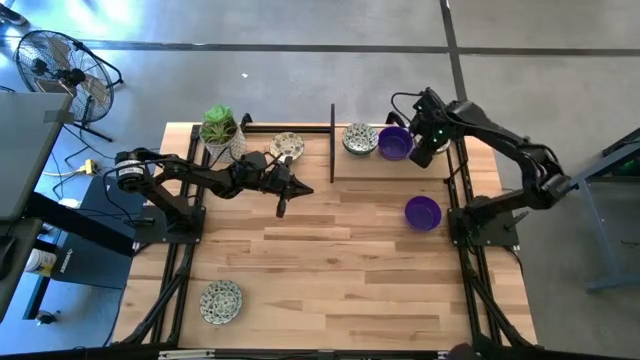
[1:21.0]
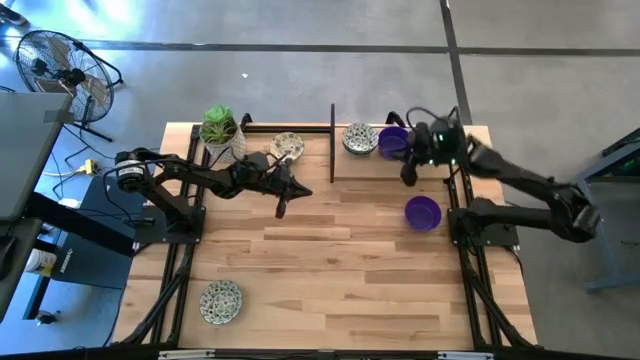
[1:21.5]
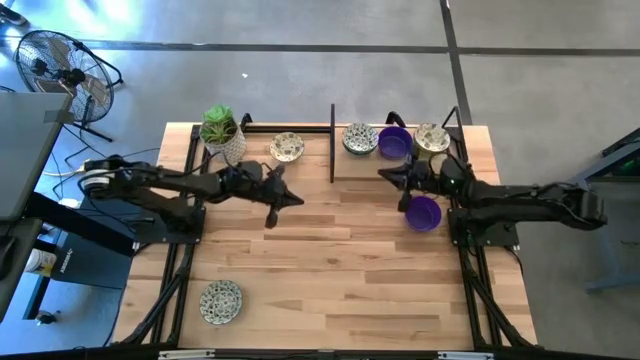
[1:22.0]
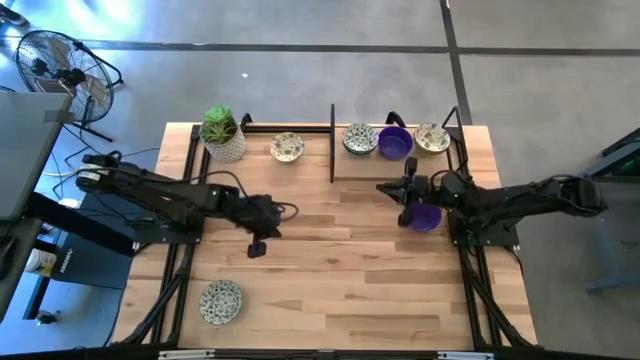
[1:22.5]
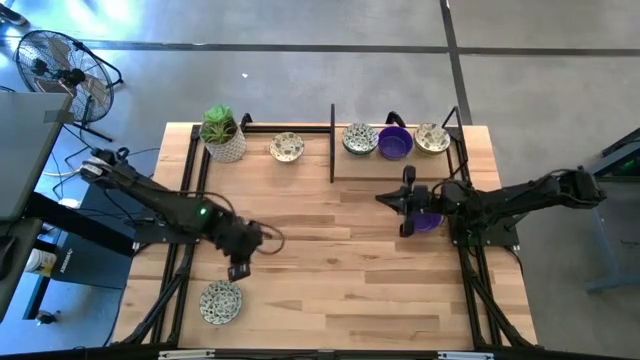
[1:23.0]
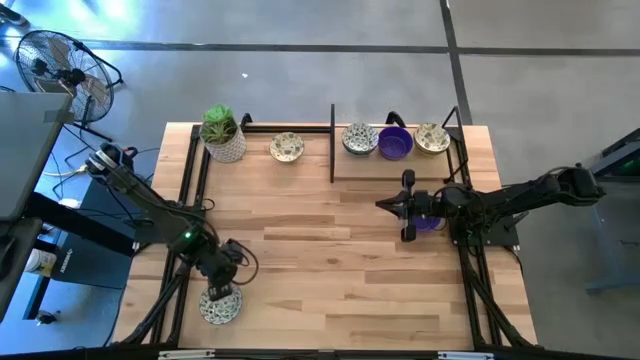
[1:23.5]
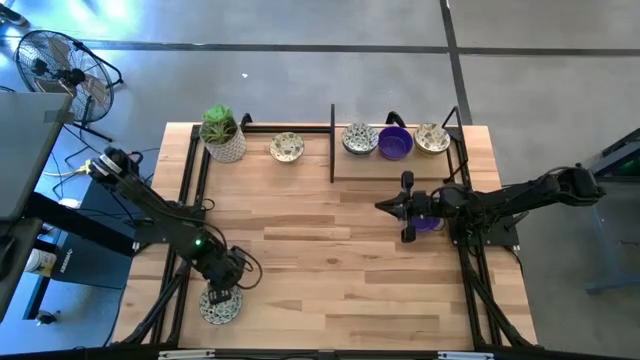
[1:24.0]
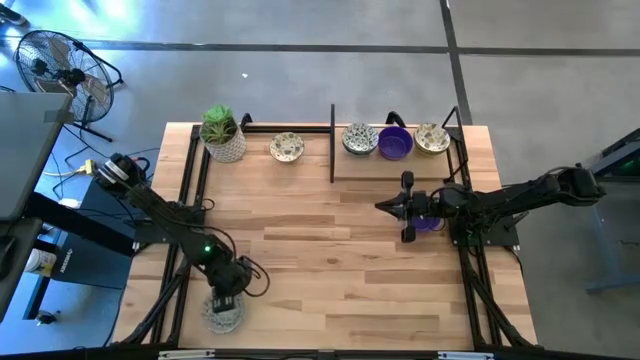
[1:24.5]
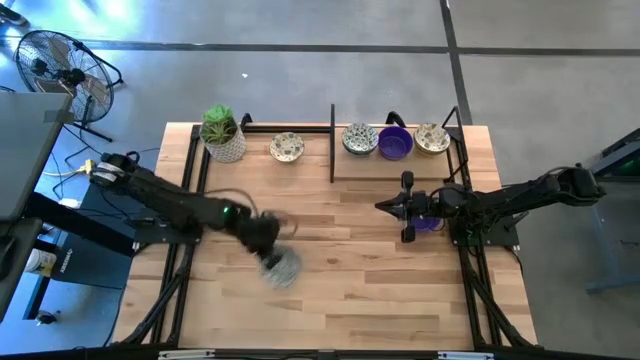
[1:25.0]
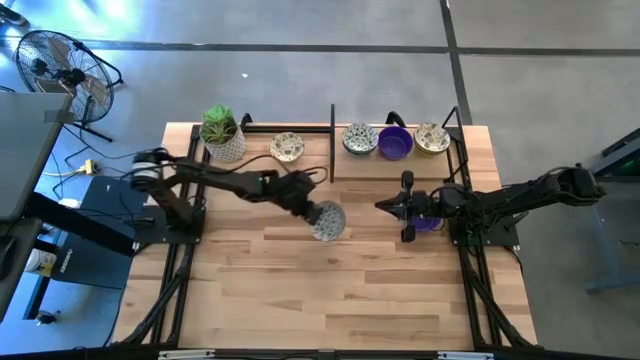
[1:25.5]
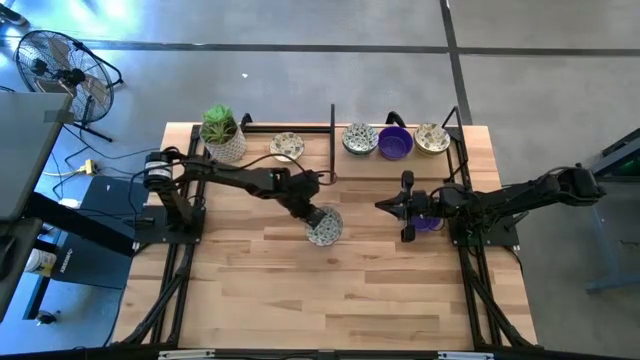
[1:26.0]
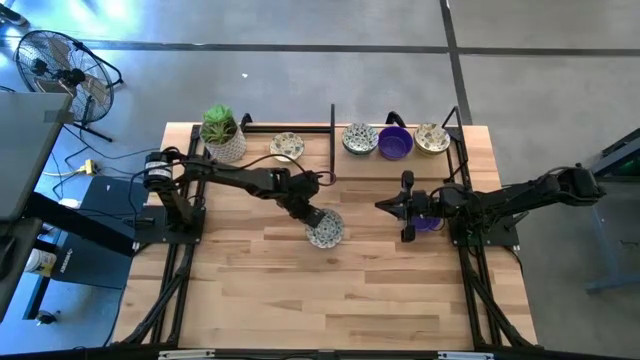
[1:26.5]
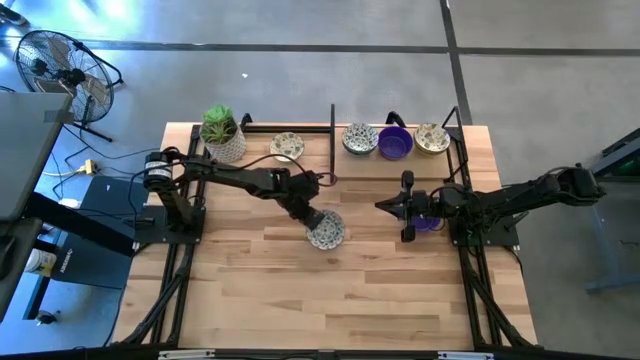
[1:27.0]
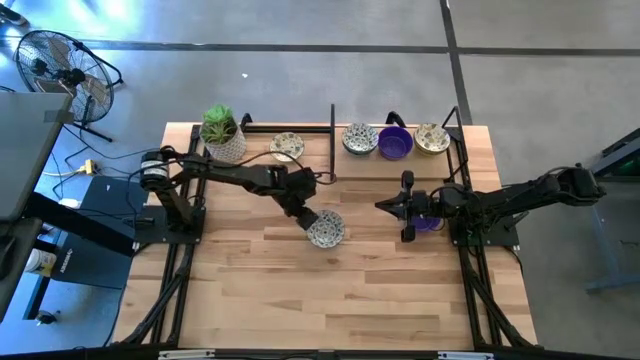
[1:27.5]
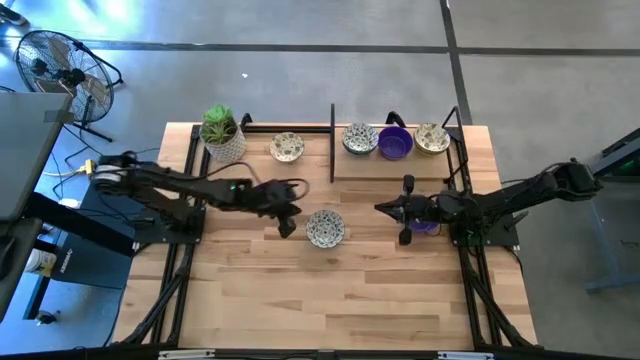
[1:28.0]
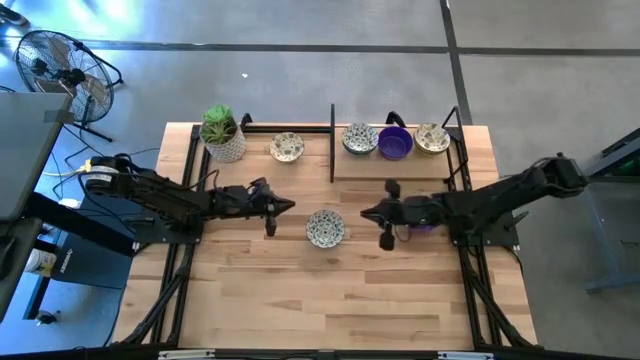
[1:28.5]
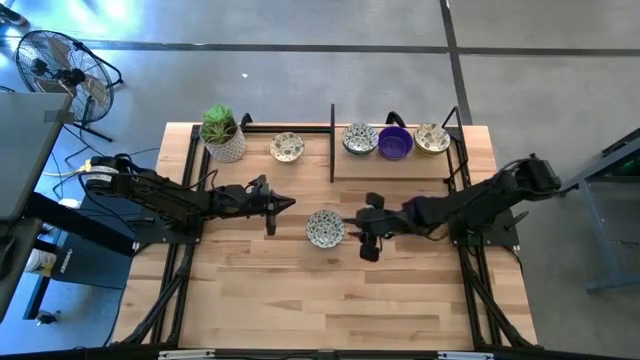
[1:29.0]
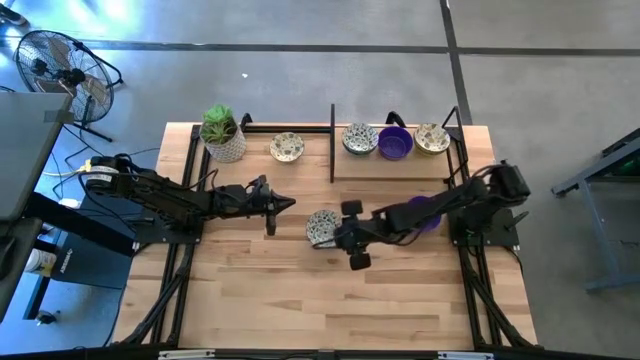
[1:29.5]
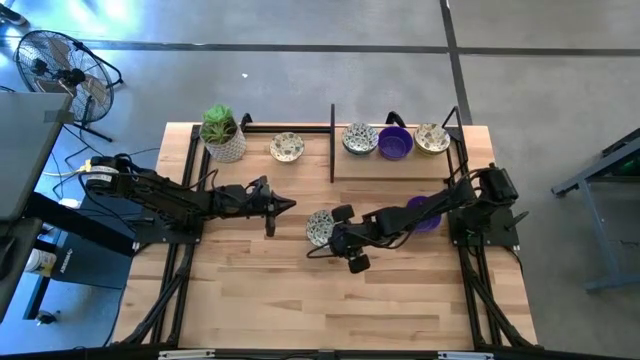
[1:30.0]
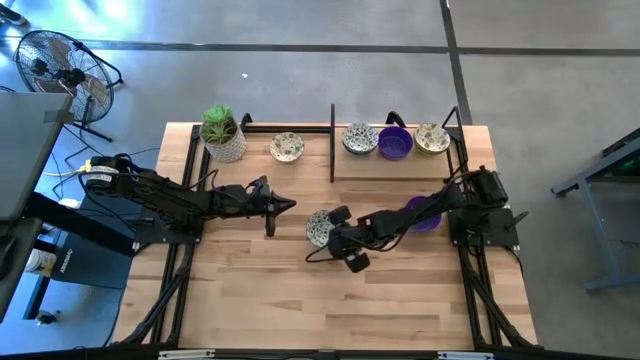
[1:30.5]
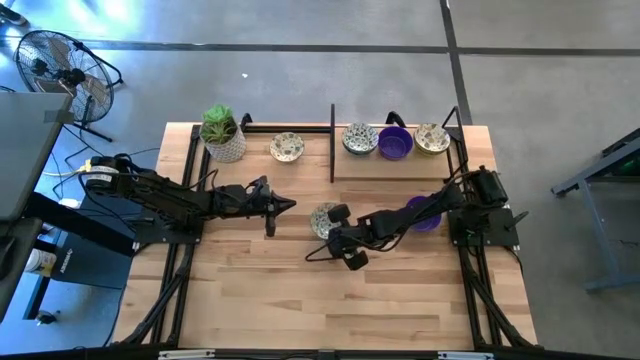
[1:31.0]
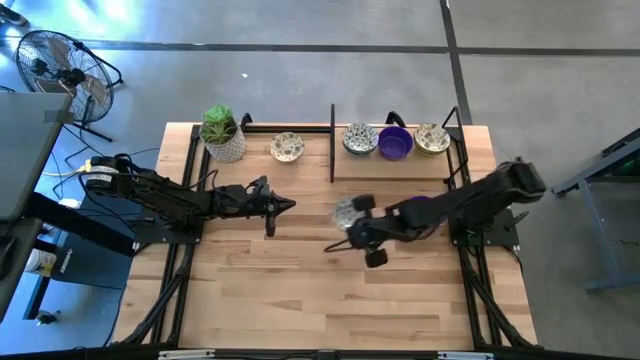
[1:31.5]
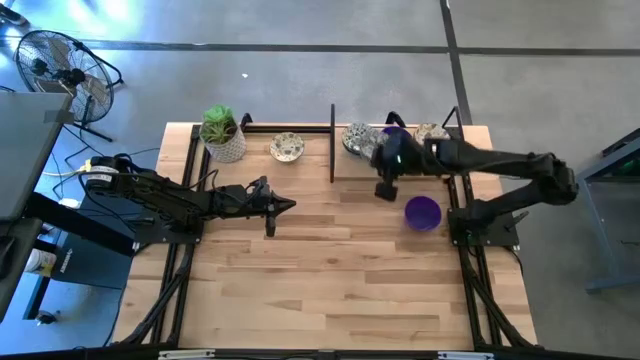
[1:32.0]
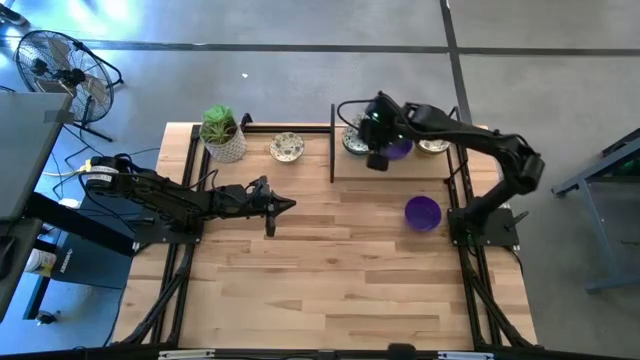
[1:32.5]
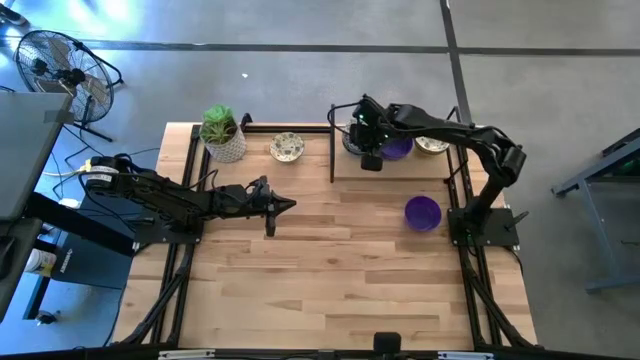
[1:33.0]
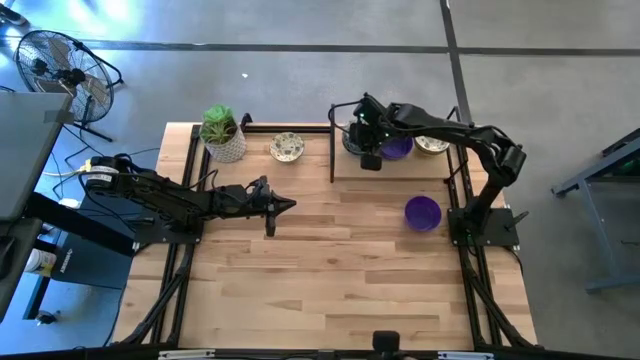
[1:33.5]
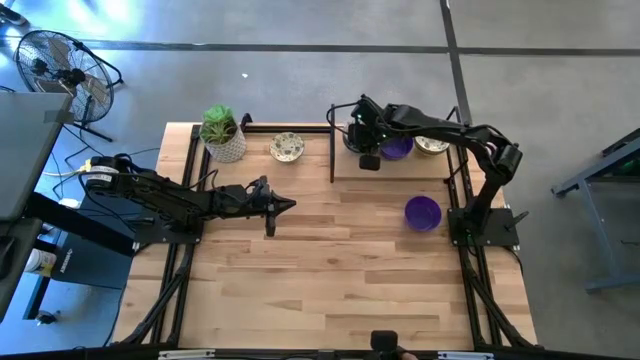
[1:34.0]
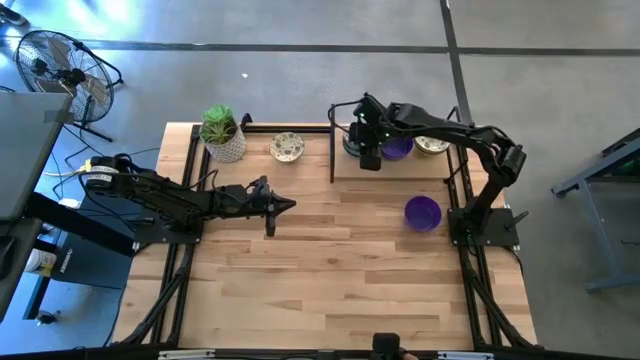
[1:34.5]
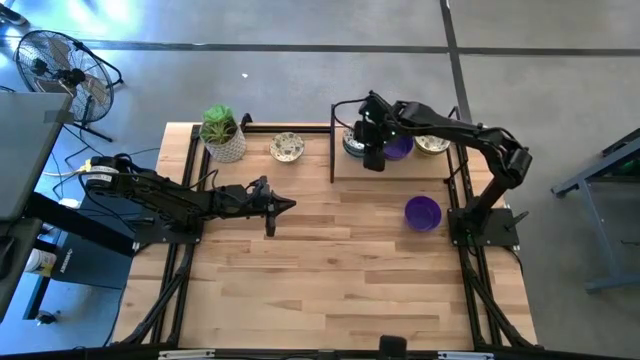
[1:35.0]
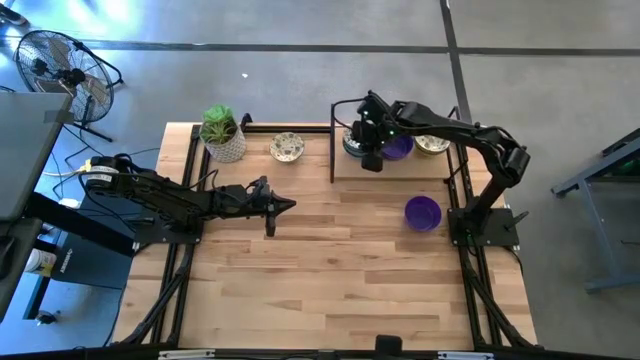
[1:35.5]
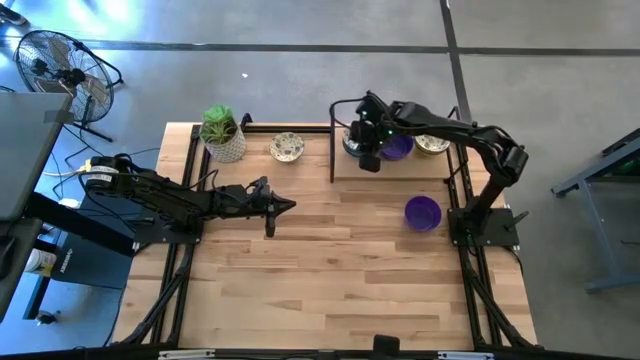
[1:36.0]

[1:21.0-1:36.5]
Task: Pick & Place Mini bowls
Stack the light blue bowl on top of the light blue bowls on the shelf

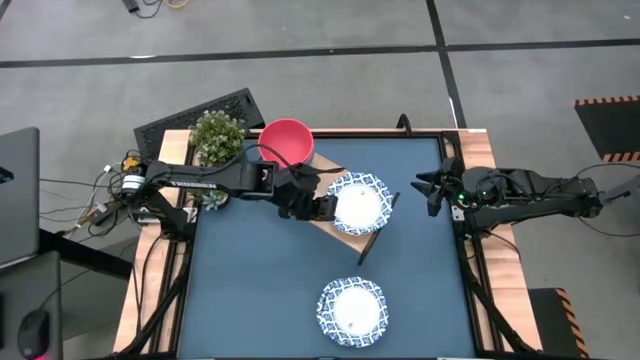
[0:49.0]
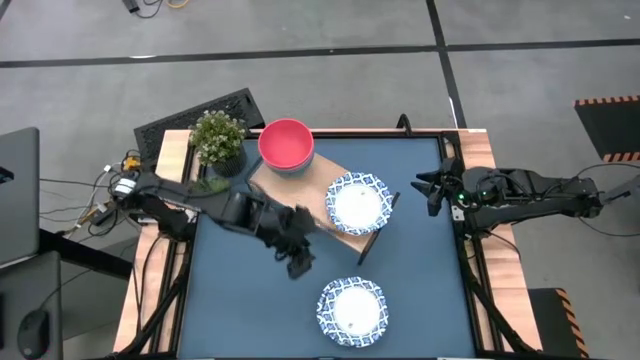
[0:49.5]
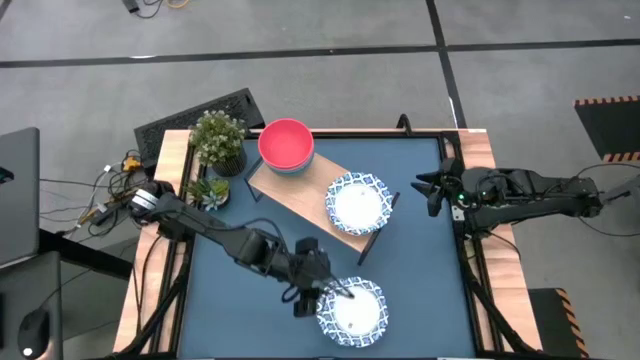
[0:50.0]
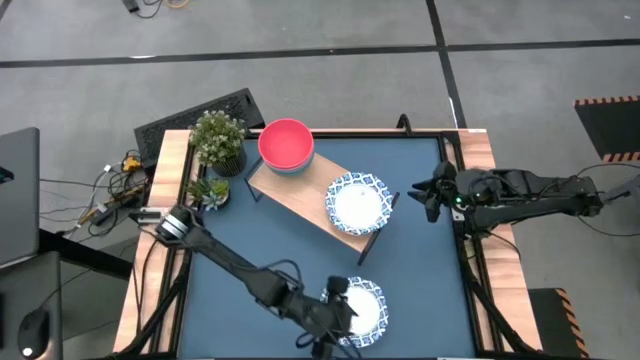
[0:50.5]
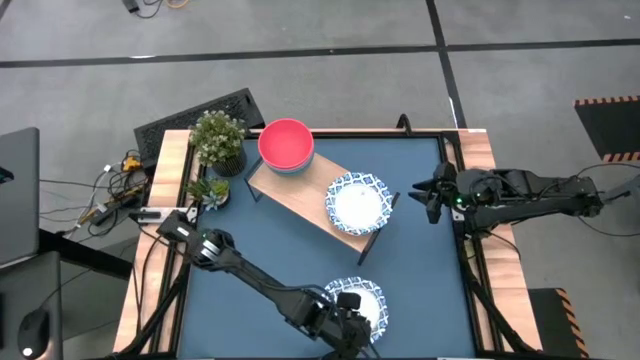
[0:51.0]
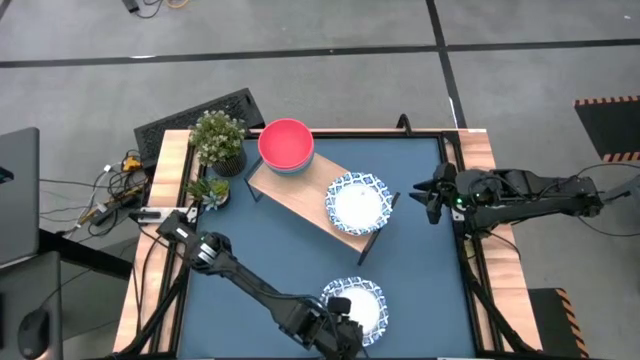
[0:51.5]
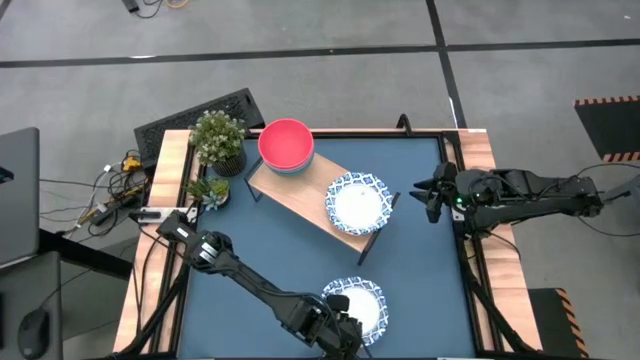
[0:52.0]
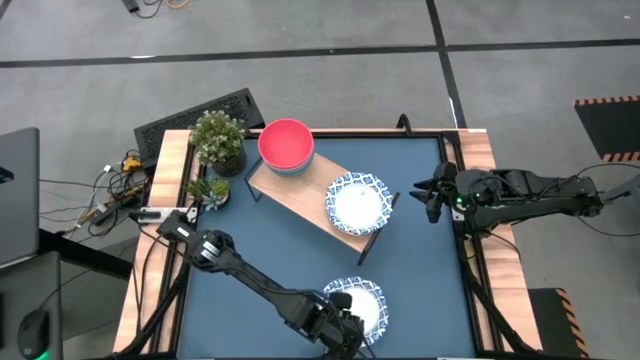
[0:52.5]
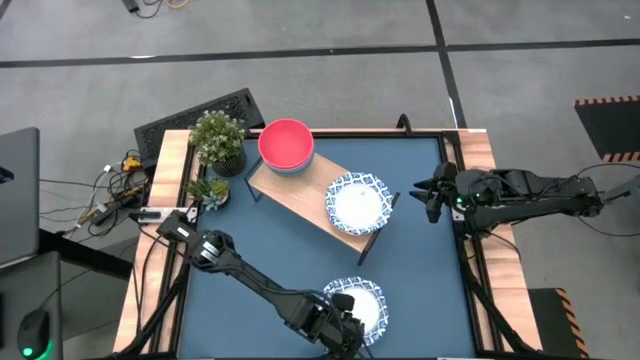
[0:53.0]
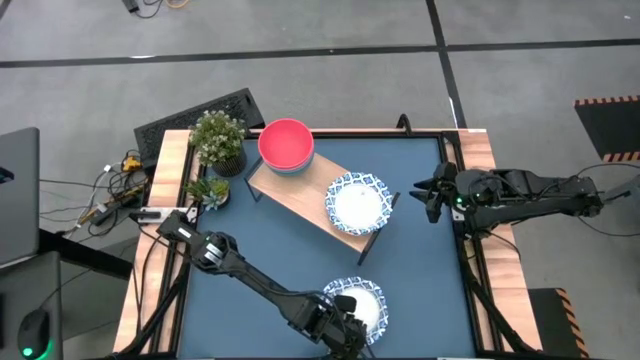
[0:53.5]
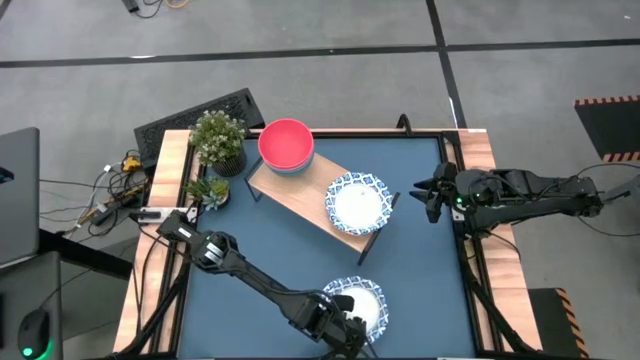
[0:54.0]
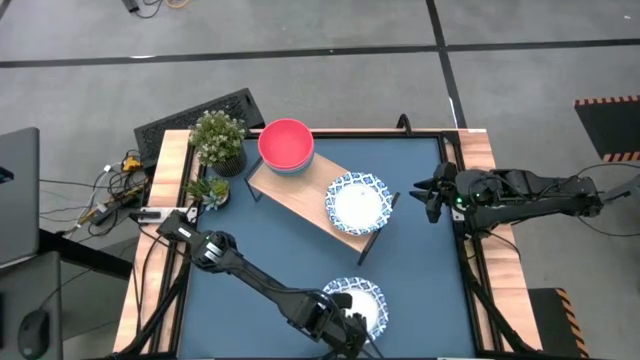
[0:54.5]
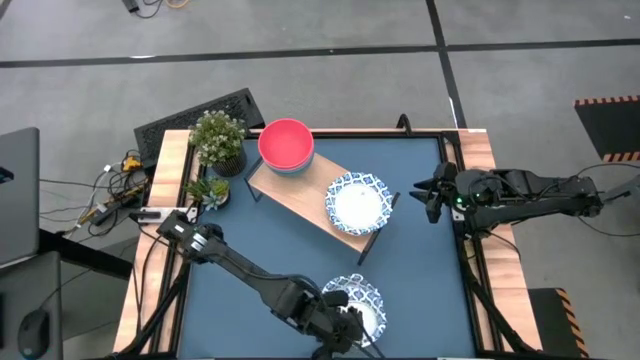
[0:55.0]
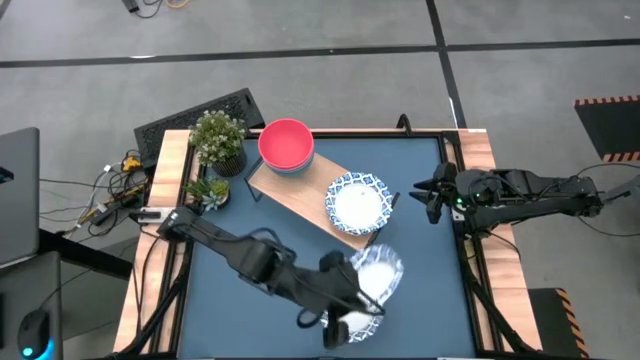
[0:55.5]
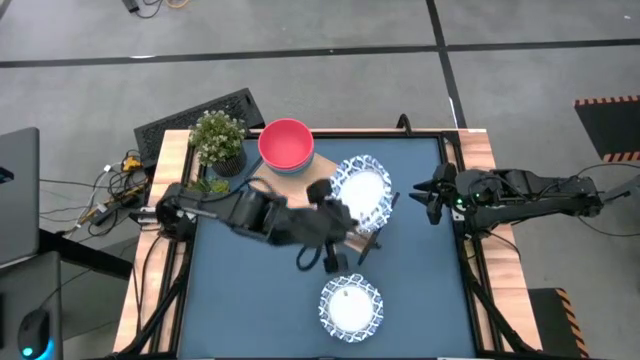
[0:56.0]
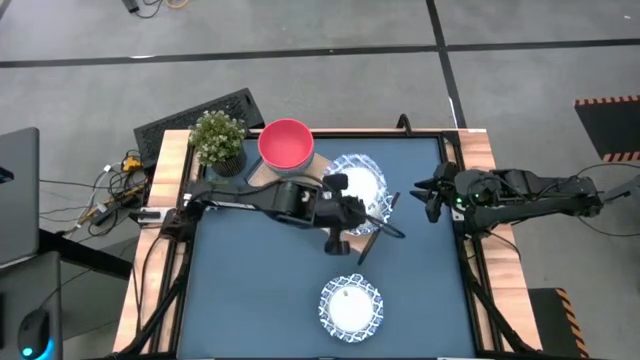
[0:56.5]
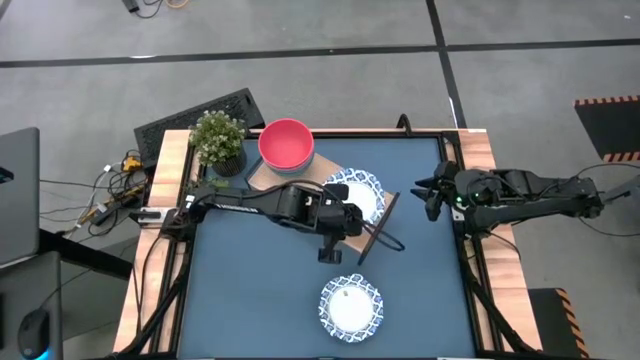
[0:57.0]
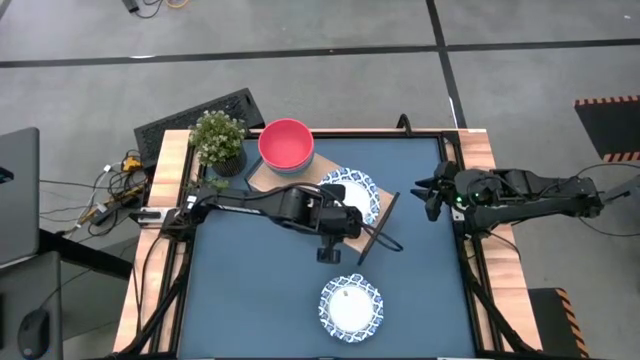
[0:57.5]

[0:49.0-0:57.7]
Task: Place and stack bowls onto a shelf
Stack the top white bowl on top of the white bowls on the shelf
